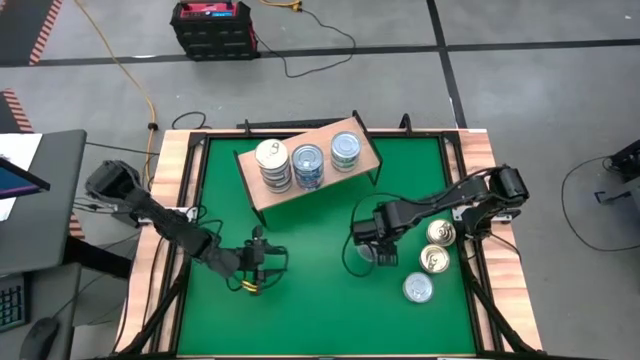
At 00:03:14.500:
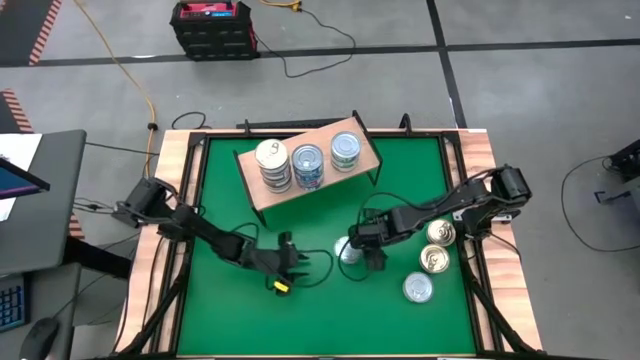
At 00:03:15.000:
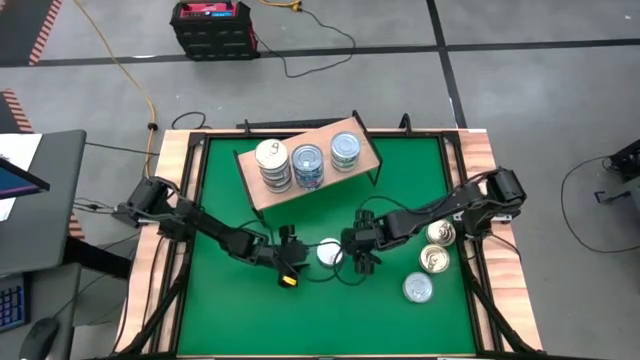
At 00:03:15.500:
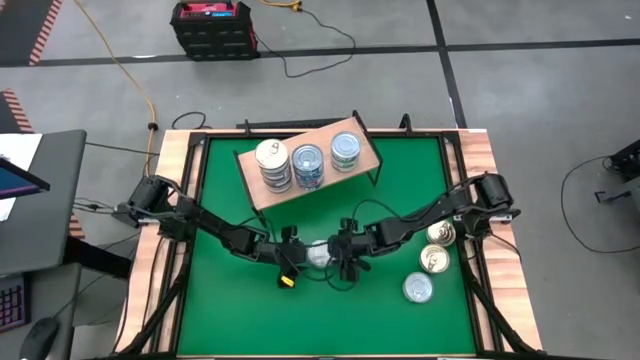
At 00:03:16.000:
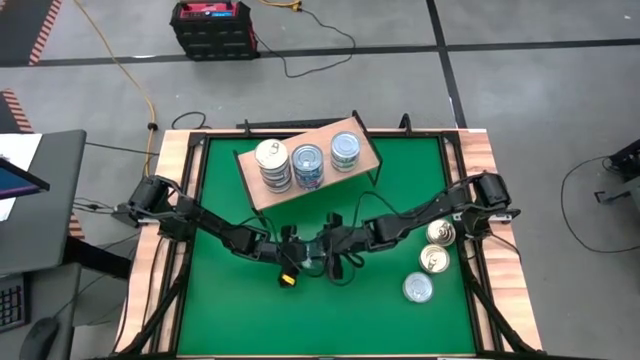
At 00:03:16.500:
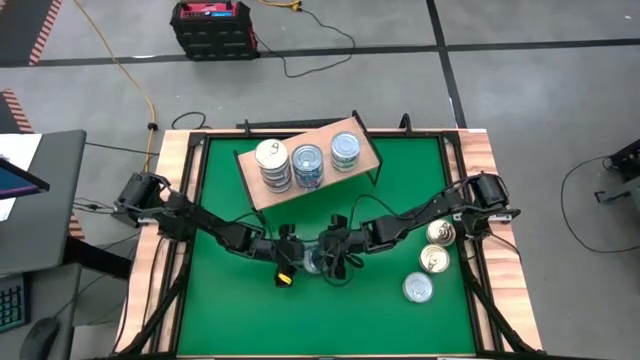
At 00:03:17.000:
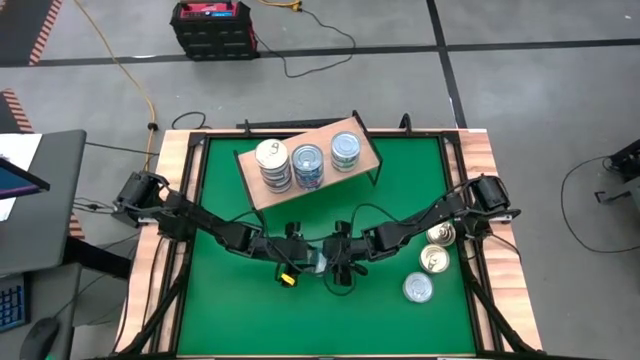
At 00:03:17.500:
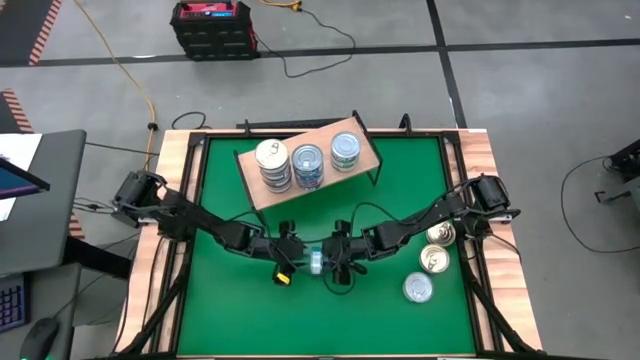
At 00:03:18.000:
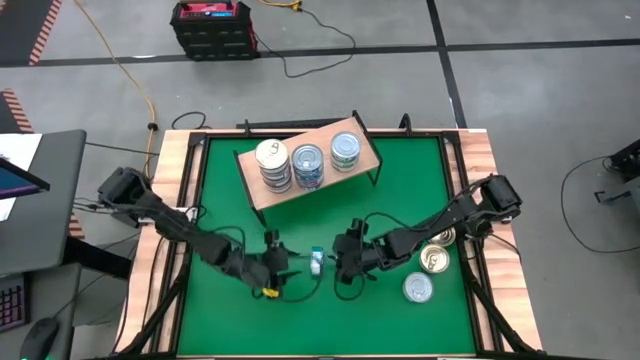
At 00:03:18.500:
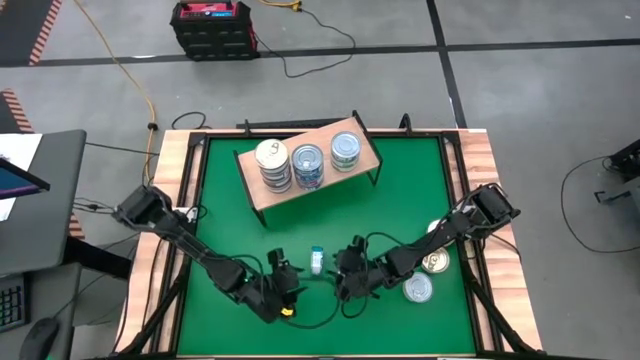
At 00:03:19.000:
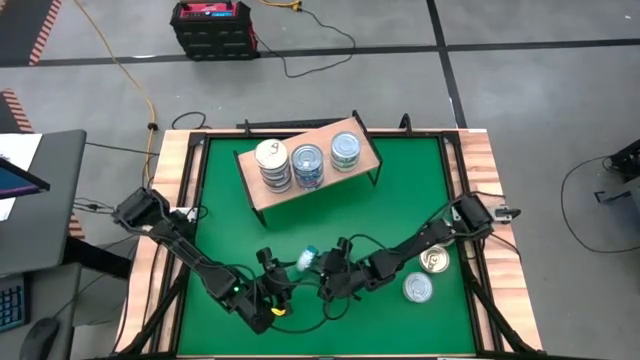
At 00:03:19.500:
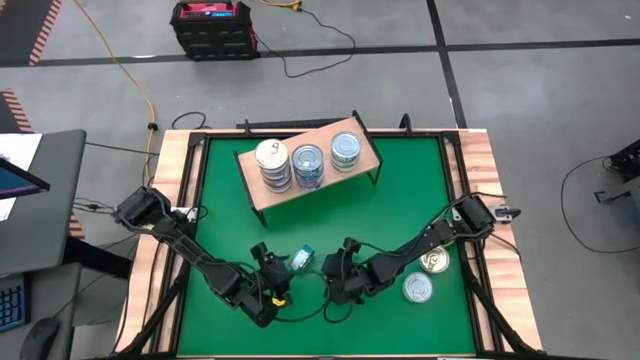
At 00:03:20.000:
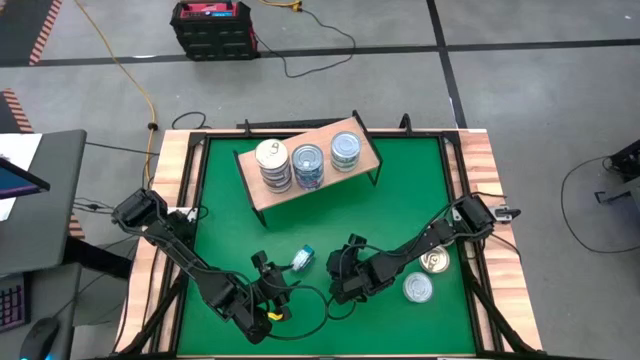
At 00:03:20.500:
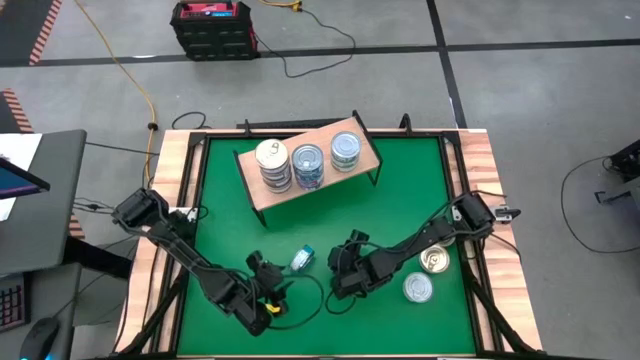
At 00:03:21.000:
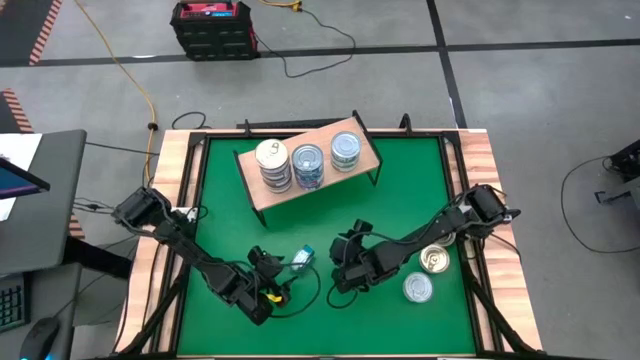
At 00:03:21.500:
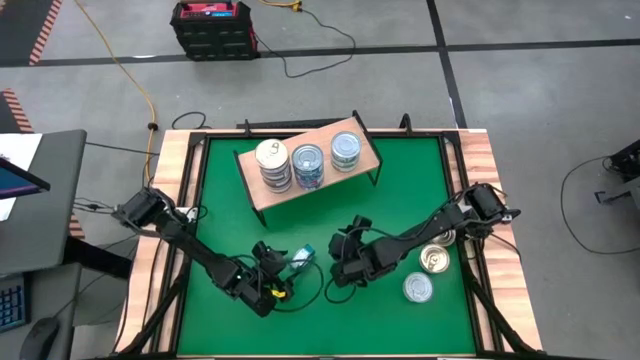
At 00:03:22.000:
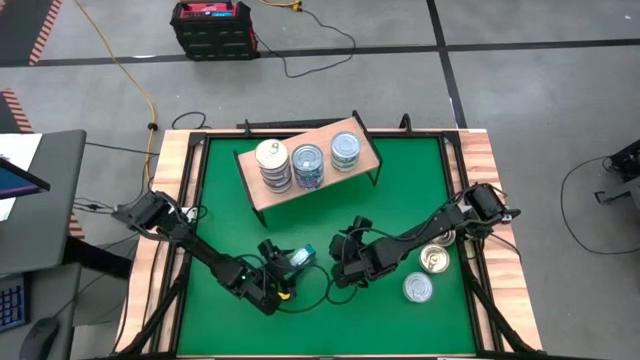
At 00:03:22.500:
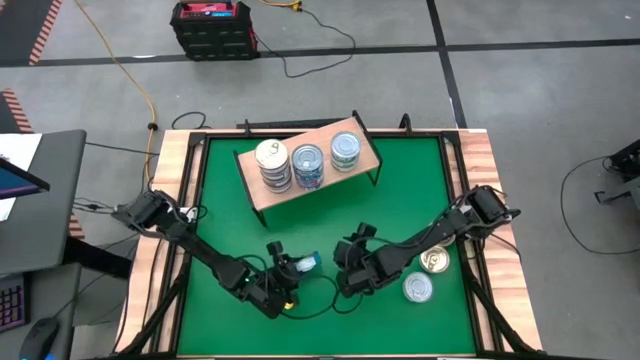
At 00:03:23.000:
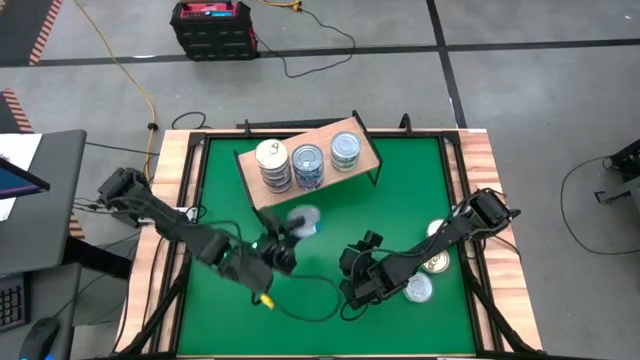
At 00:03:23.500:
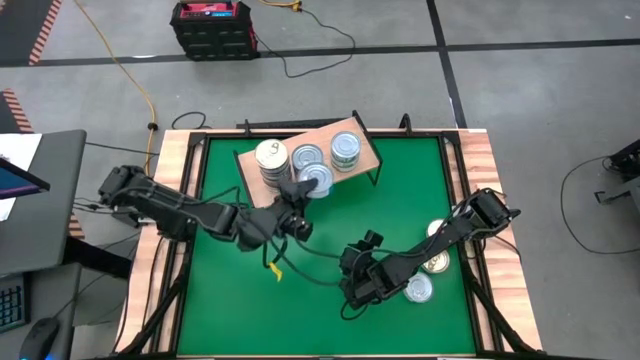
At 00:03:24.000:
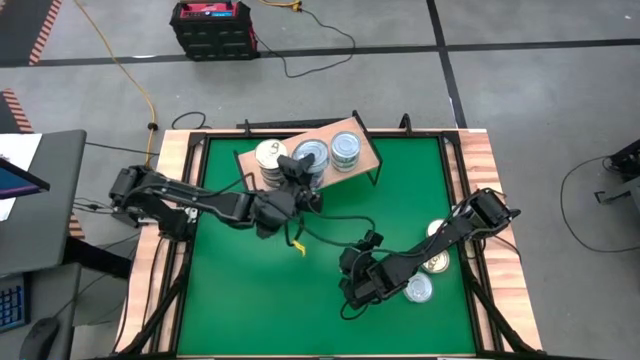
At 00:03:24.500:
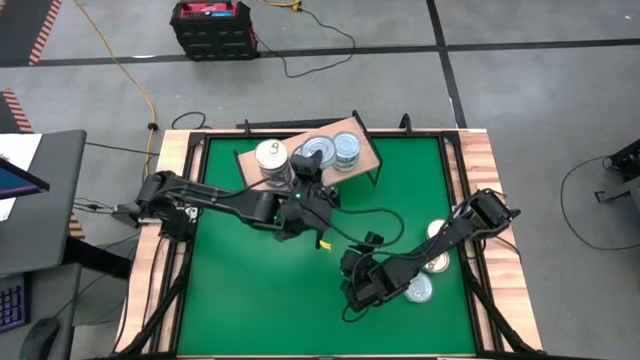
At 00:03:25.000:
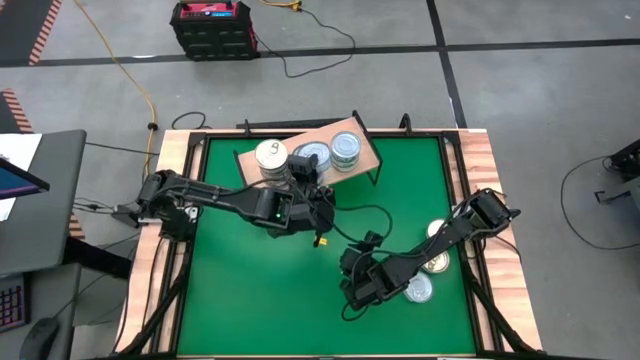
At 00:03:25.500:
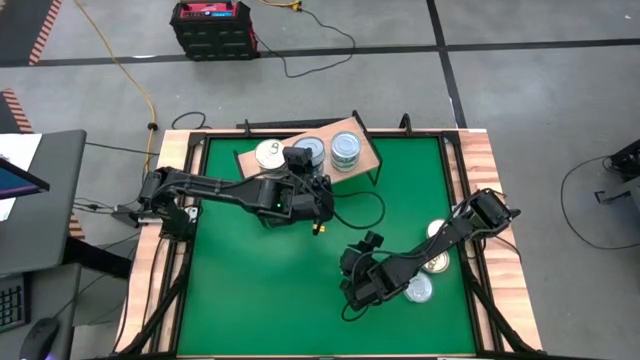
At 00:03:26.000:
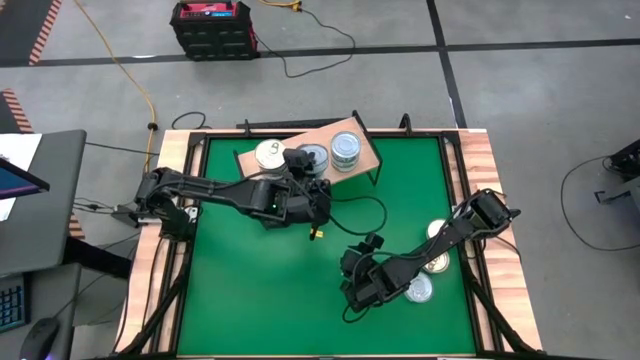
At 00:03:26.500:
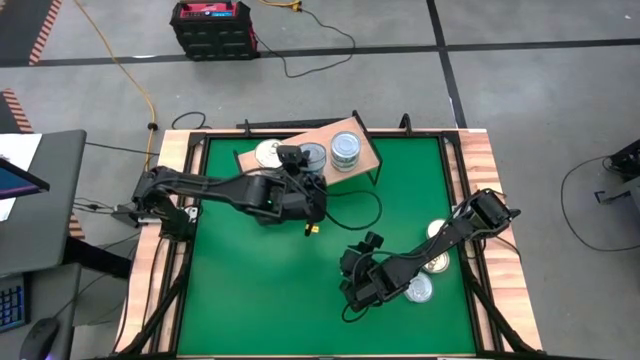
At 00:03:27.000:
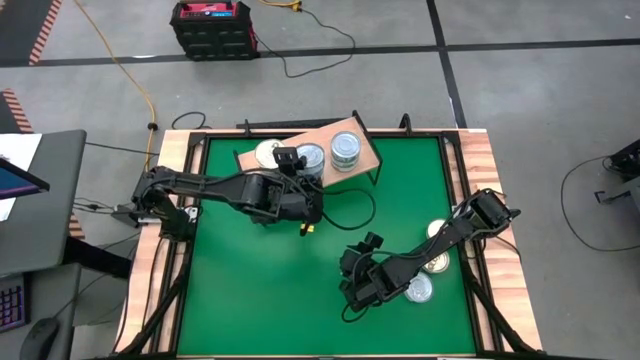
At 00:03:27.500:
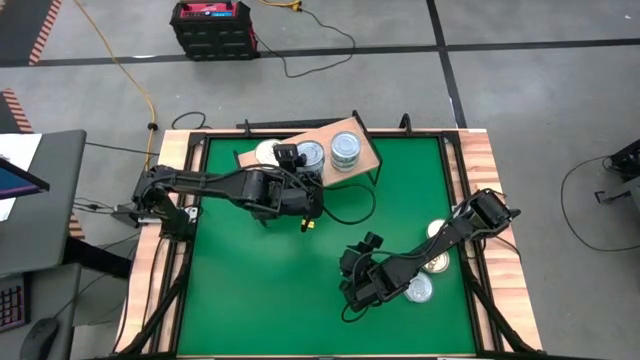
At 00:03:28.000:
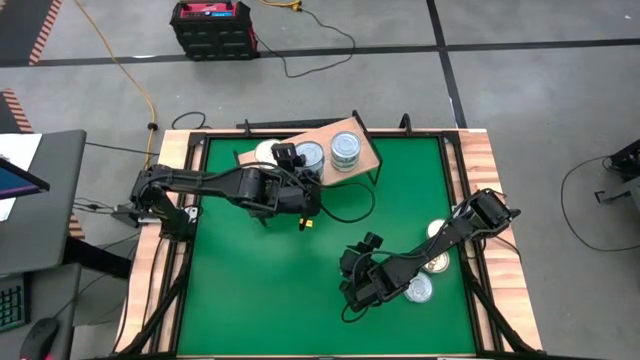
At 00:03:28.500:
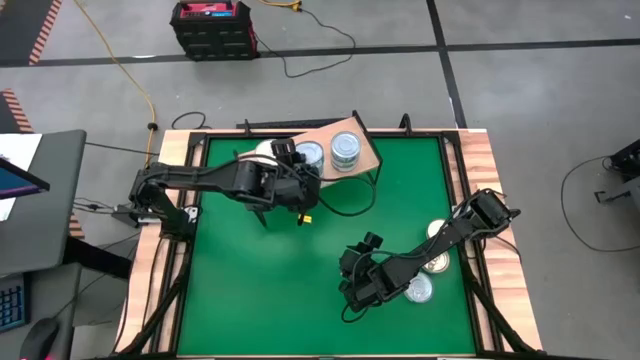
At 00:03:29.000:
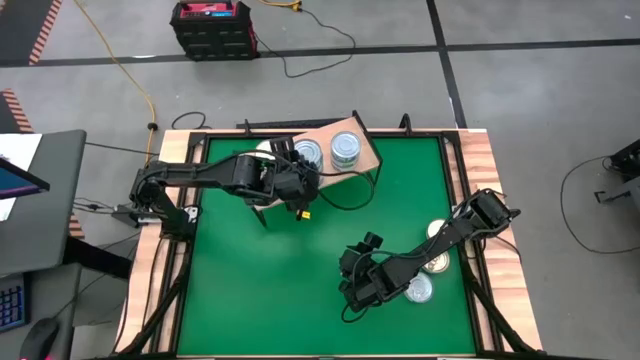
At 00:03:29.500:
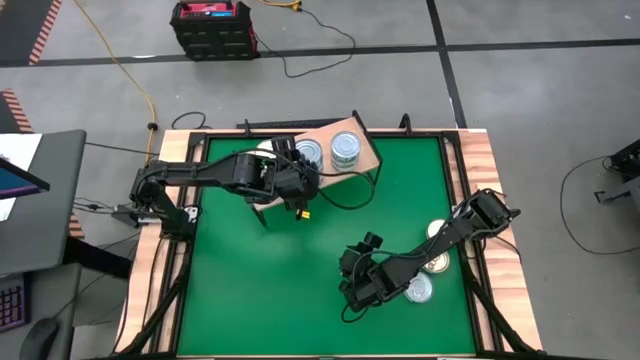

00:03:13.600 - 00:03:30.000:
Task: Stack canned seafood by type on shelf
Stack the yellow blue tuna can on top of the blue tuna can on the shelf

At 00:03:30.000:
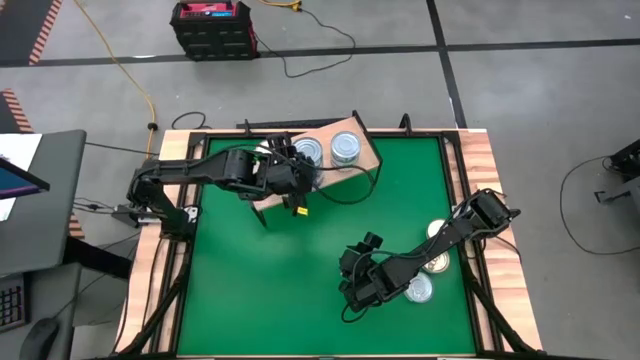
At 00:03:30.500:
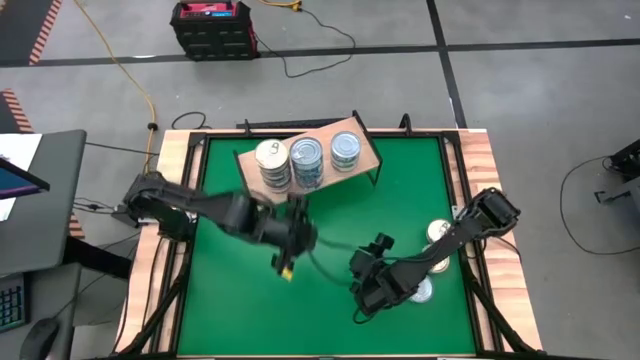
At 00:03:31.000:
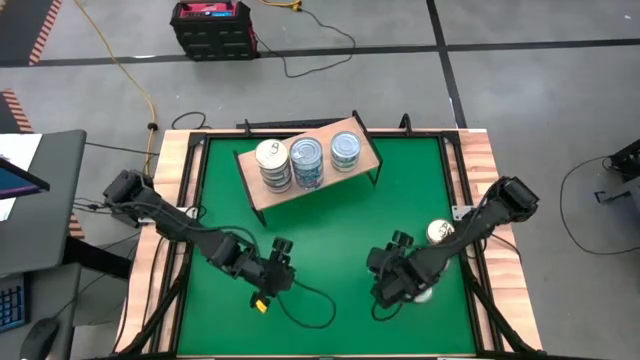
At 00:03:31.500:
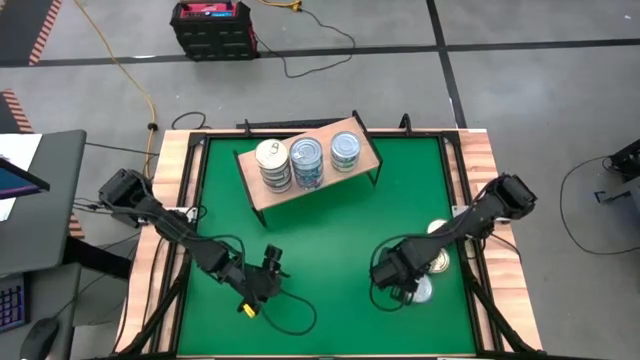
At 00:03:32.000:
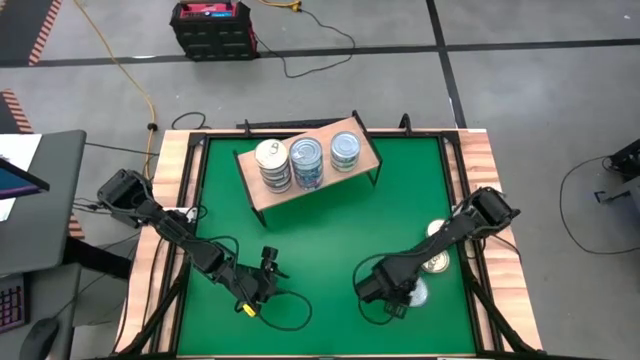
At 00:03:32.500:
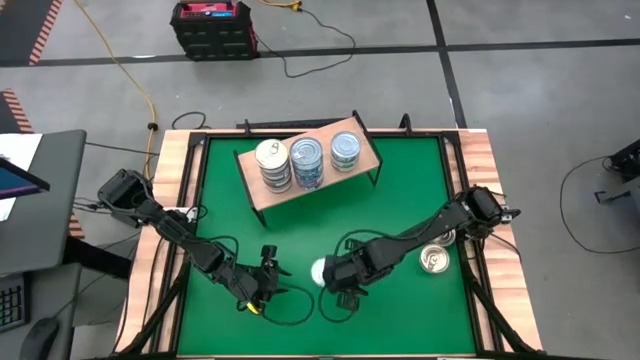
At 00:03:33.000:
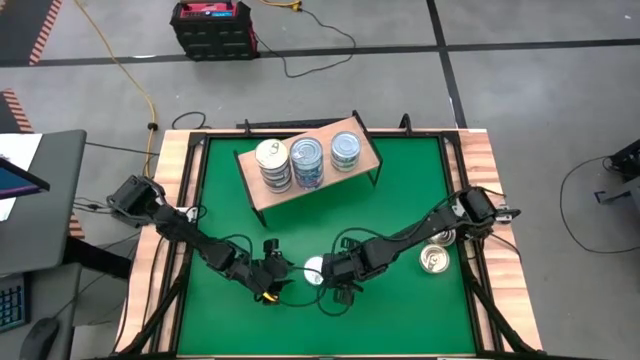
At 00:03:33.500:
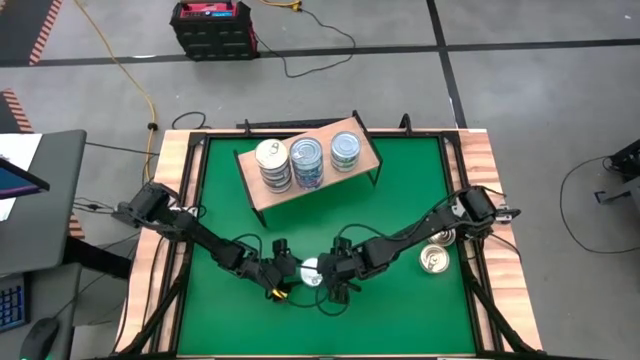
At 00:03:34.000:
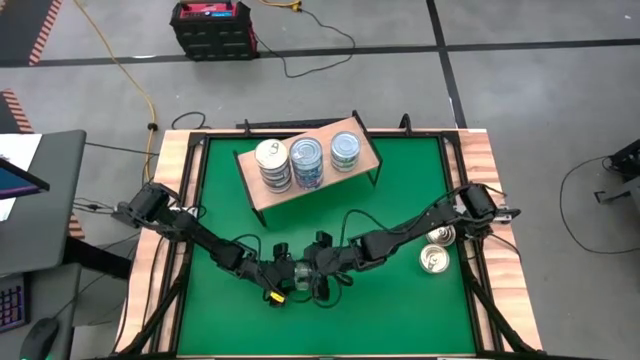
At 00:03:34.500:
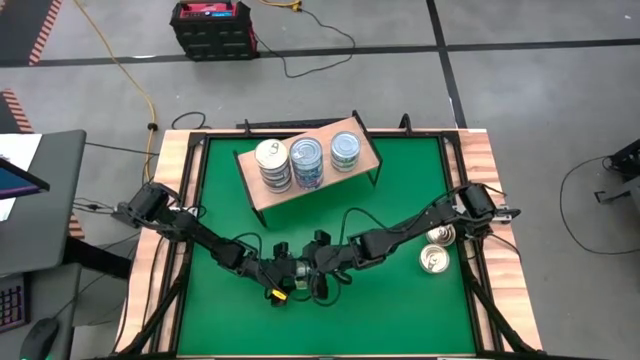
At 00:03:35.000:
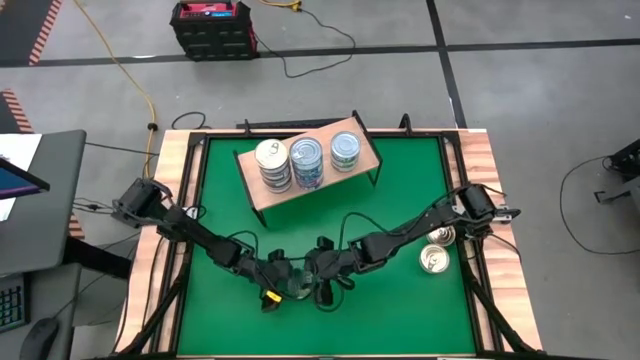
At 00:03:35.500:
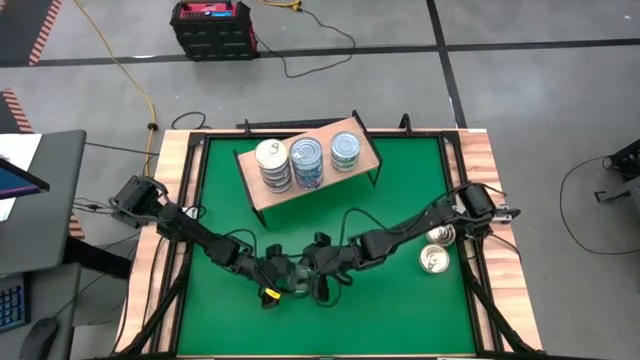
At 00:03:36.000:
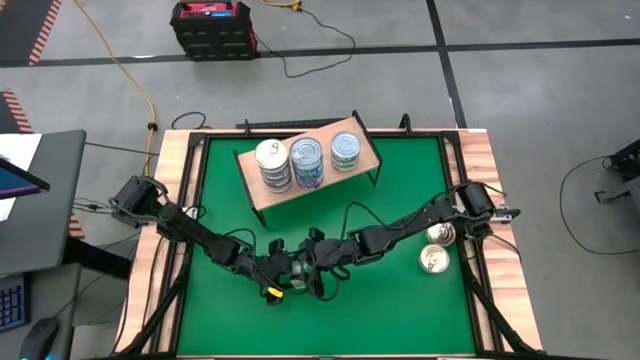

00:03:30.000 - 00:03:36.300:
Stack the green tuna can on top of the yellow blue tuna can on the shelf
